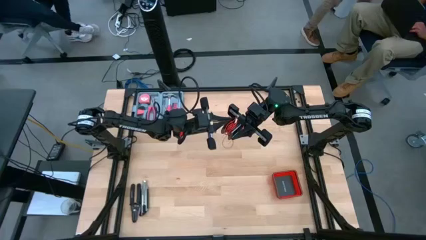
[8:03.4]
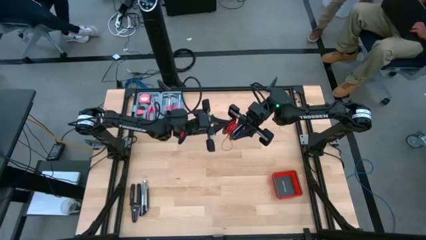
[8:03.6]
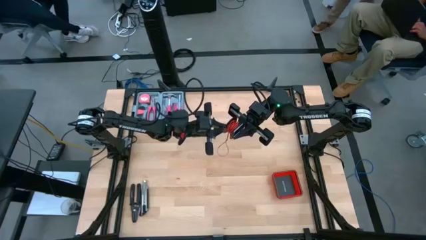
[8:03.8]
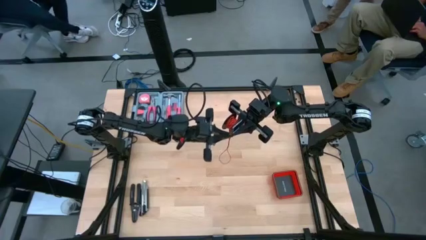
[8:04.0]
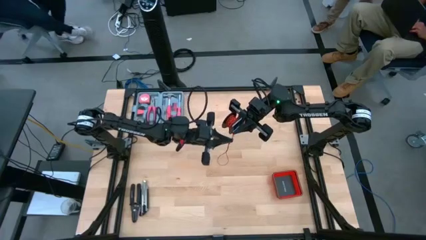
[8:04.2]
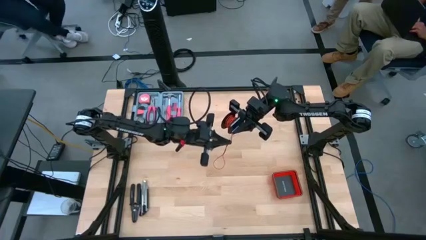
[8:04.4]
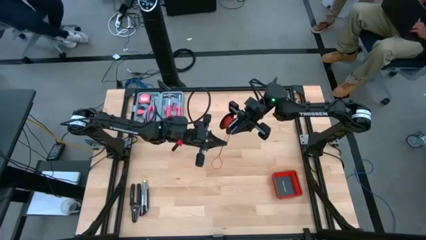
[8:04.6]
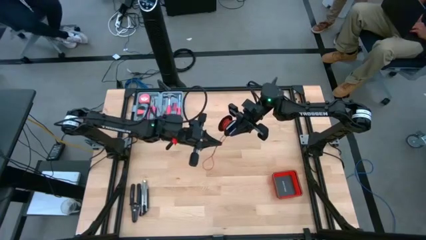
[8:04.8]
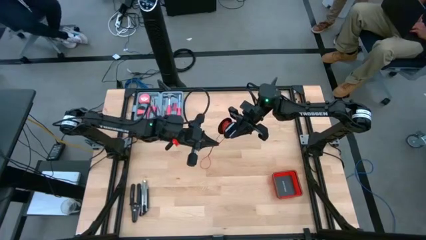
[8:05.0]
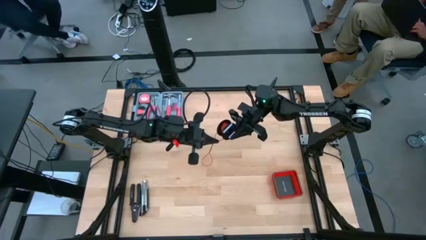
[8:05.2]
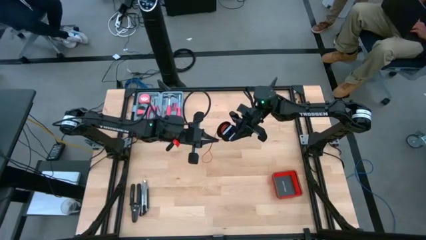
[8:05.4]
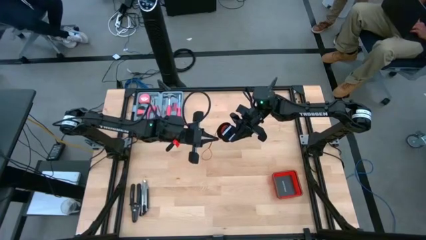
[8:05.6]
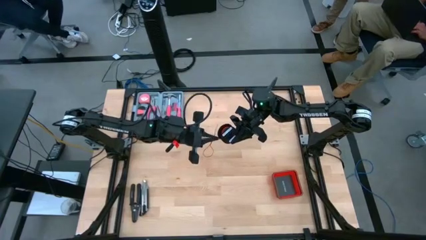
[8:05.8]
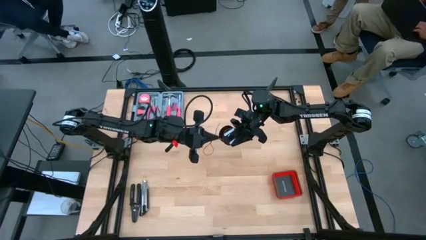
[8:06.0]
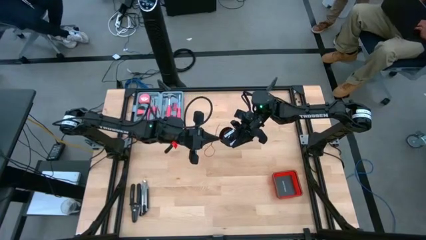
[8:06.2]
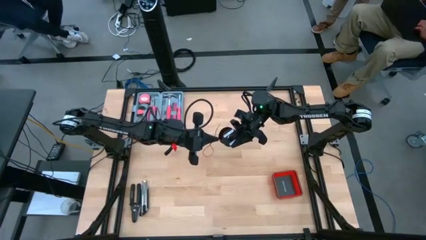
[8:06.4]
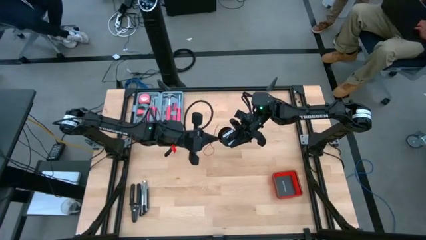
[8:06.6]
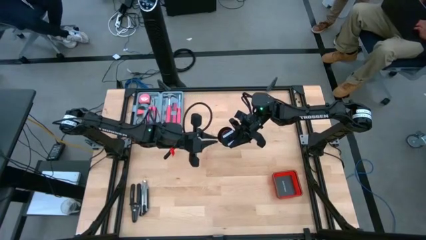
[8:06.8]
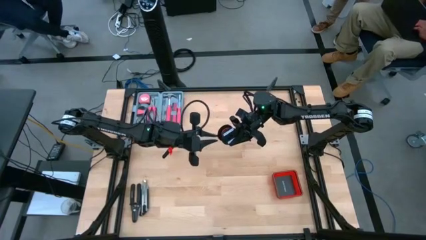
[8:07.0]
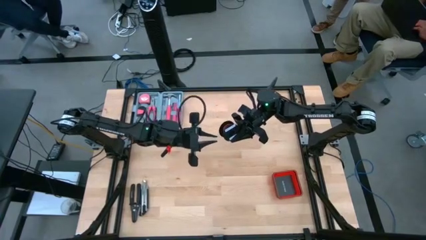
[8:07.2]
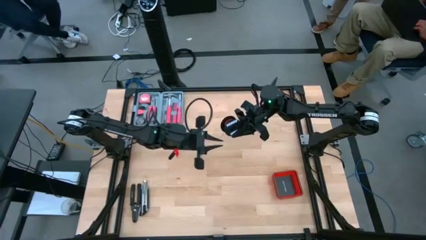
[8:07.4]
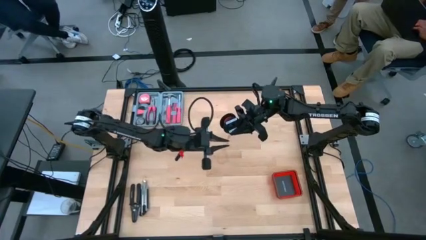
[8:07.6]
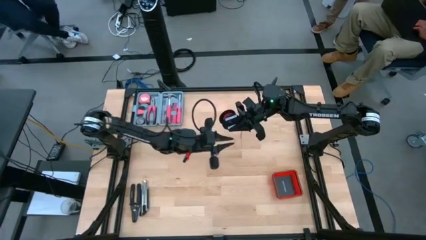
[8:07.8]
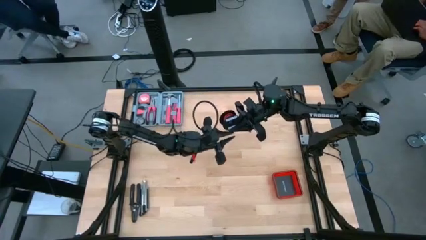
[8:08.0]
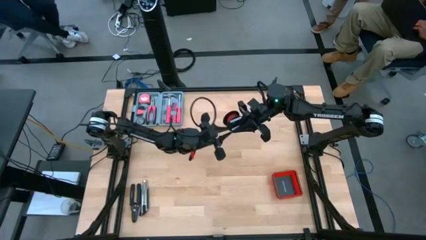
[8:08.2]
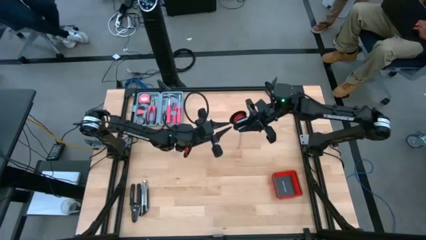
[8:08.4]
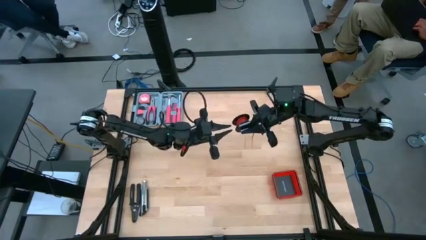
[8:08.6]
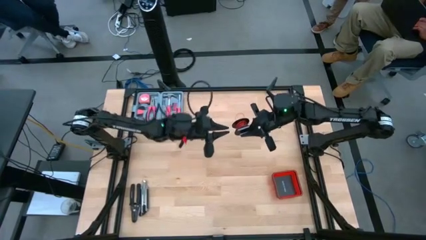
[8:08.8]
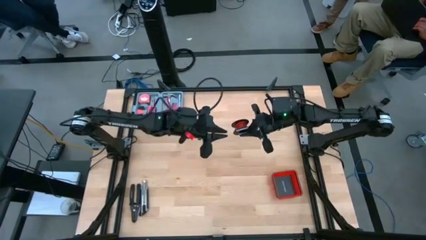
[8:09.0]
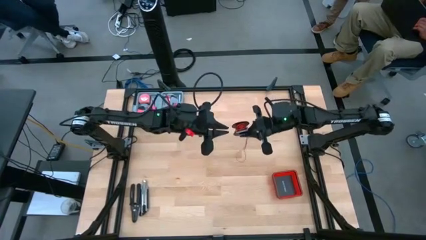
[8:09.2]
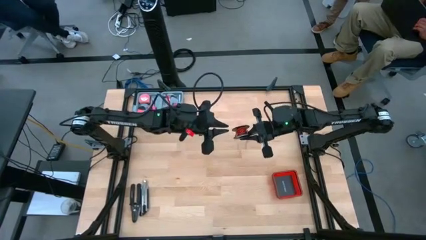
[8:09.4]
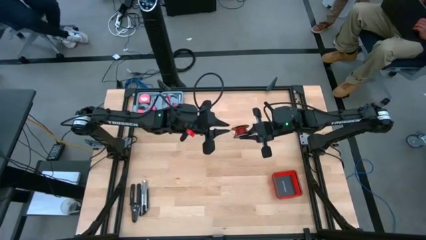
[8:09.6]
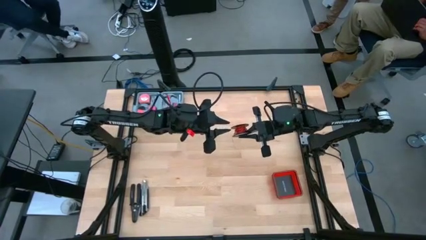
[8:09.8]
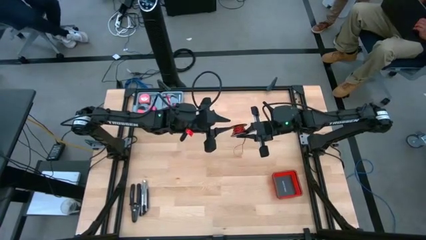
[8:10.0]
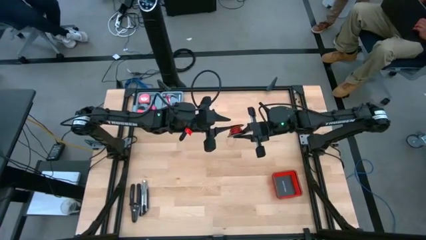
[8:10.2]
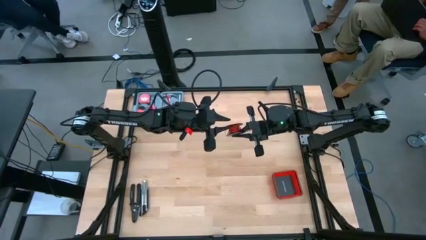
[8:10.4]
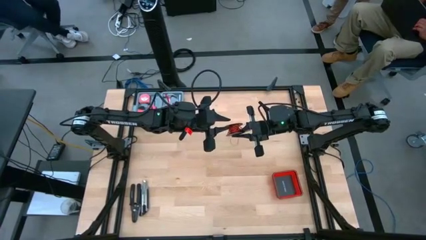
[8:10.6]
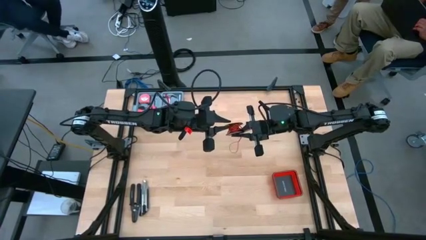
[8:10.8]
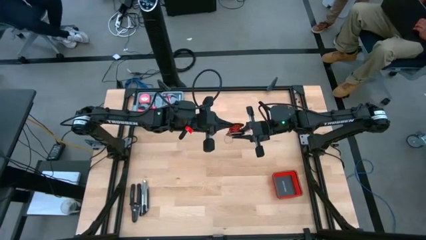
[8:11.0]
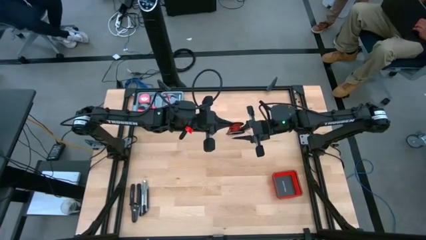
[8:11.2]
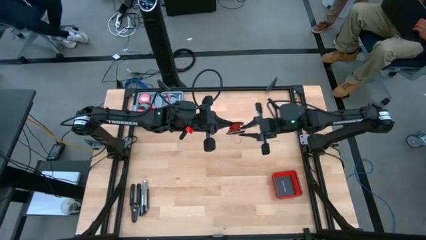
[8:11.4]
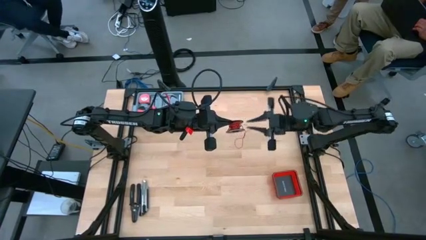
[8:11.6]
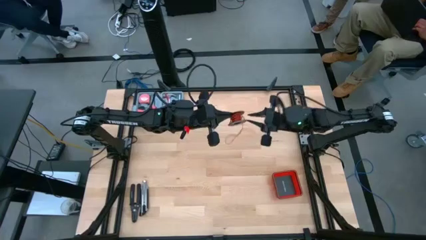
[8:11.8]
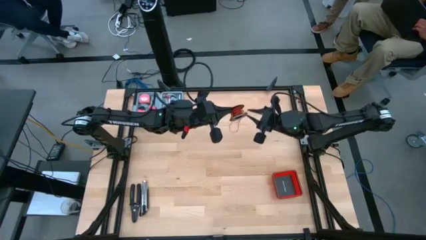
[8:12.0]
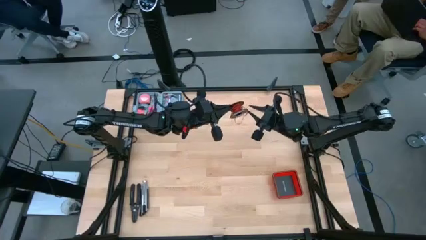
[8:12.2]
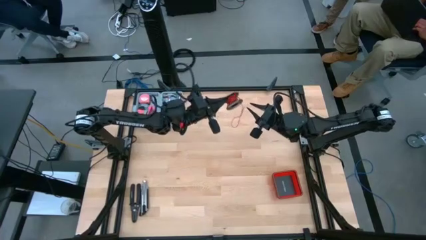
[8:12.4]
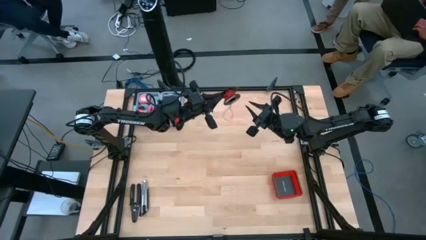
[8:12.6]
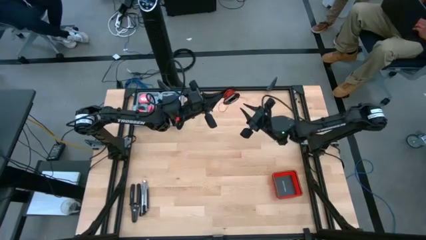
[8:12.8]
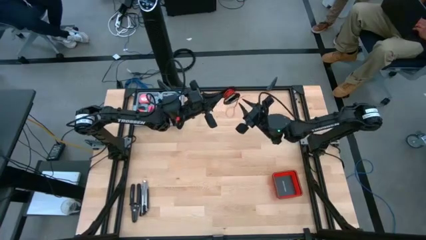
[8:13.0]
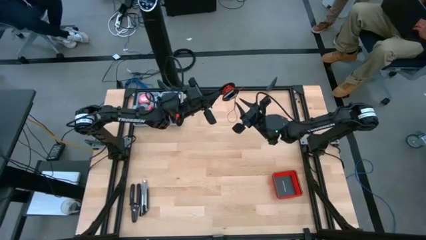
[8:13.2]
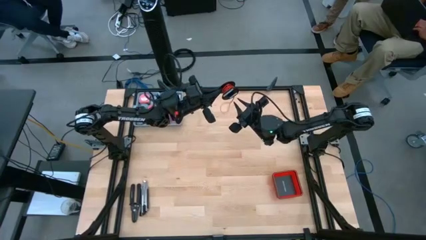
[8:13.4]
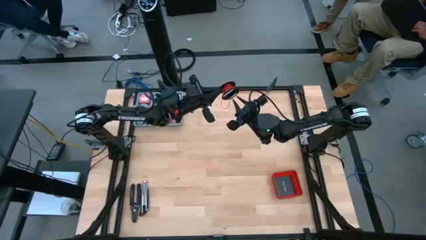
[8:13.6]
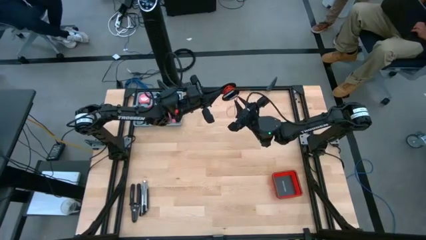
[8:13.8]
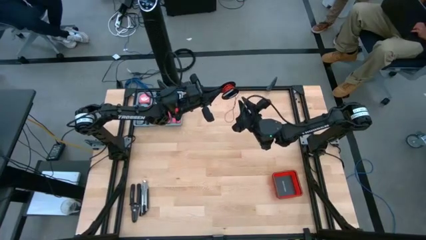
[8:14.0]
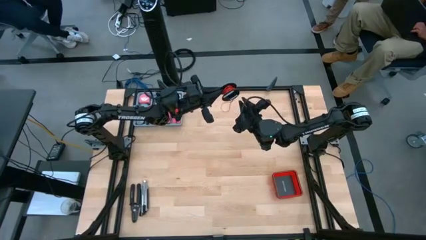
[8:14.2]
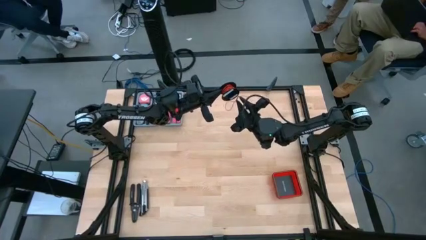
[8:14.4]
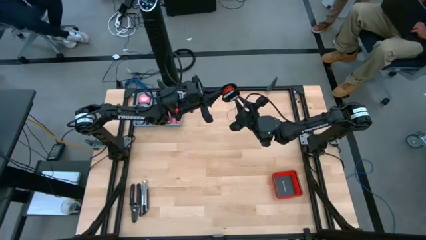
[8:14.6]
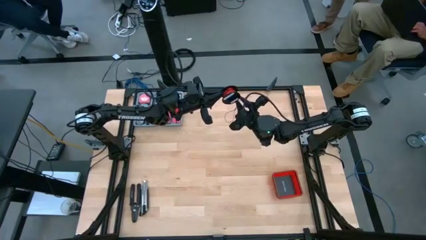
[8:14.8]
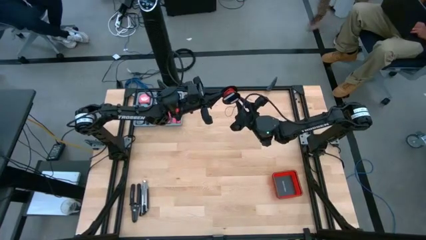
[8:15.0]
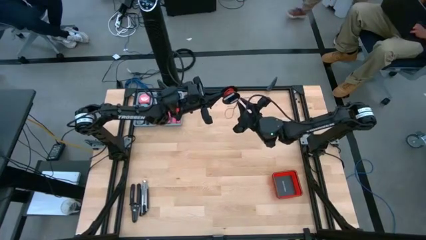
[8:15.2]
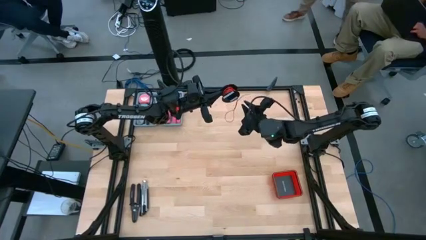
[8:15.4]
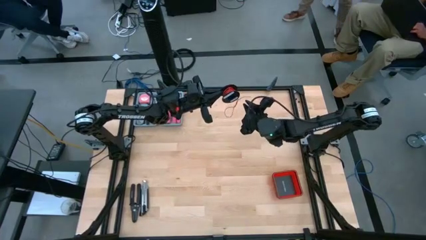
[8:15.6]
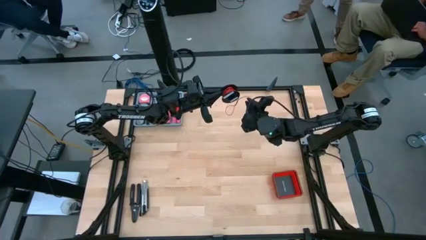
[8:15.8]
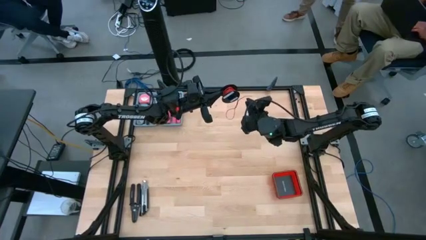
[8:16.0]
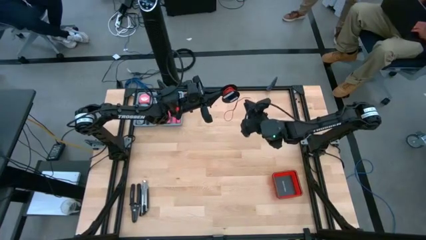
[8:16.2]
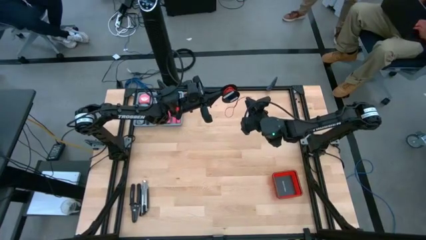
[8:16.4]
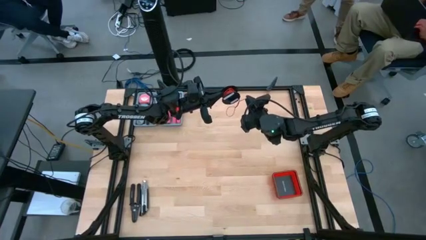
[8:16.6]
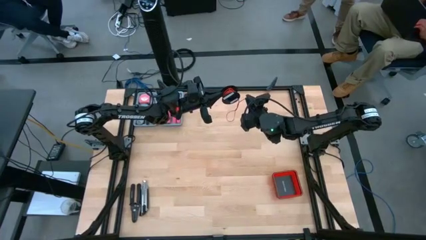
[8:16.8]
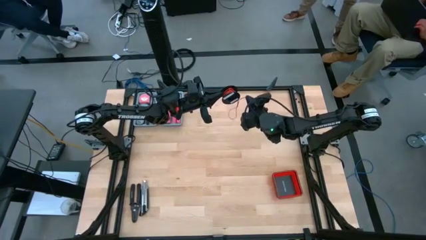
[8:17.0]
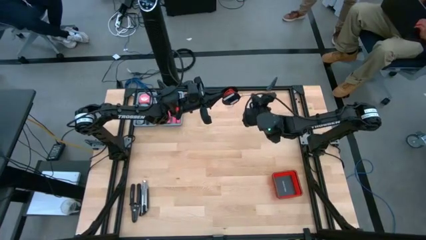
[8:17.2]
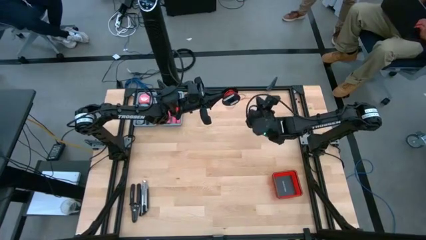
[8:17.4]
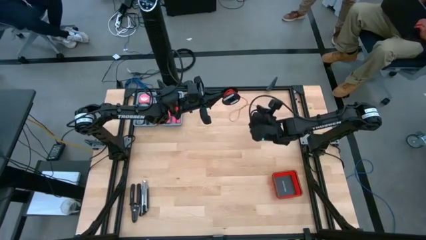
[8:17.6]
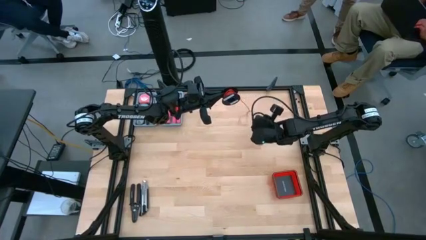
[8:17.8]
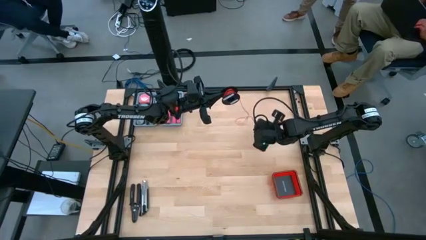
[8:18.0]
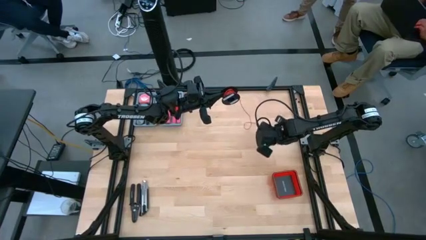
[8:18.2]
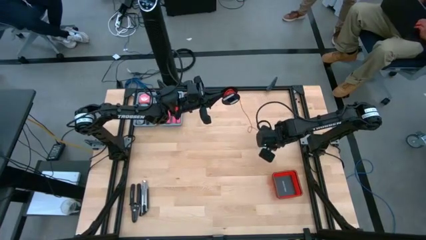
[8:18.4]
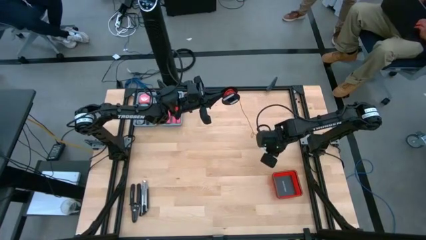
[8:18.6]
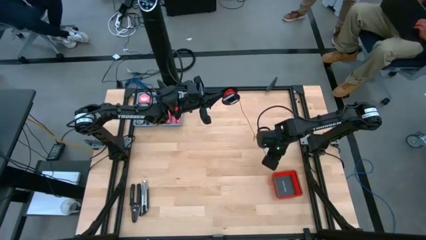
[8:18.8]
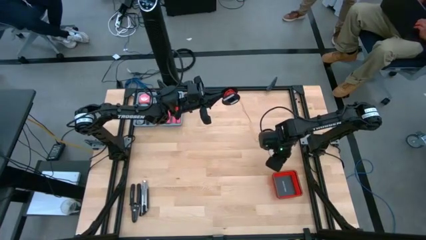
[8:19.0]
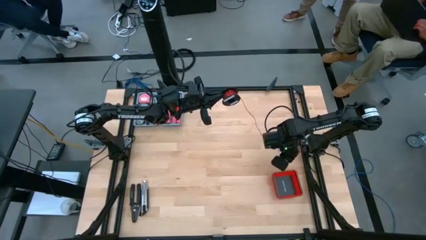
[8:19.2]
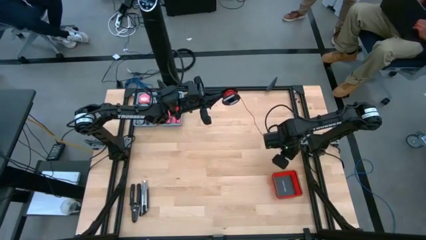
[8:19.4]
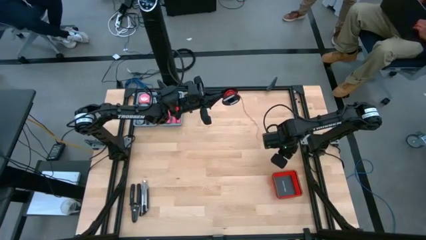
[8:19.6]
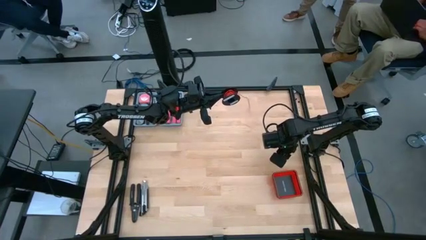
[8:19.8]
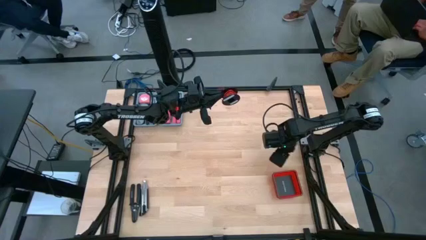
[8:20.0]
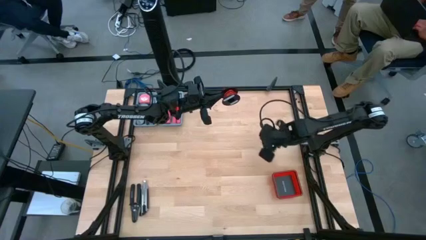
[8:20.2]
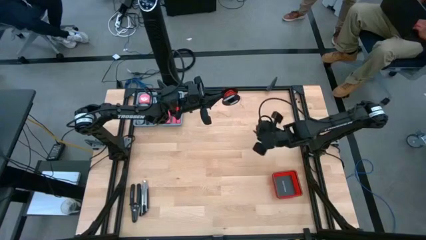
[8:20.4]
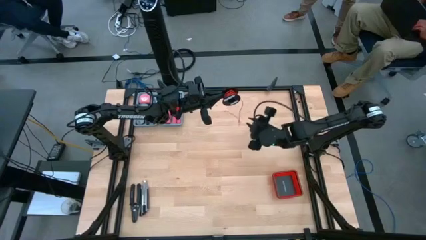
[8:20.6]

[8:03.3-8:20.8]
Task: Coil cords
Coil the red wire onto the spool
